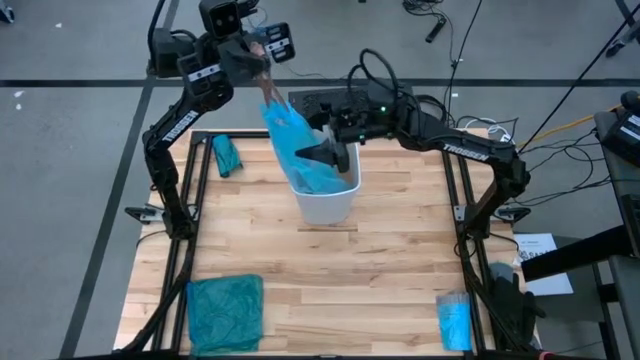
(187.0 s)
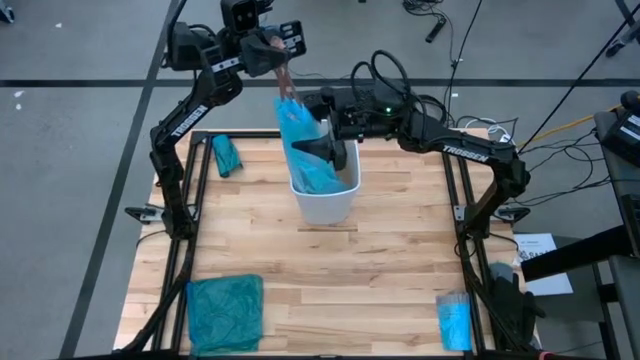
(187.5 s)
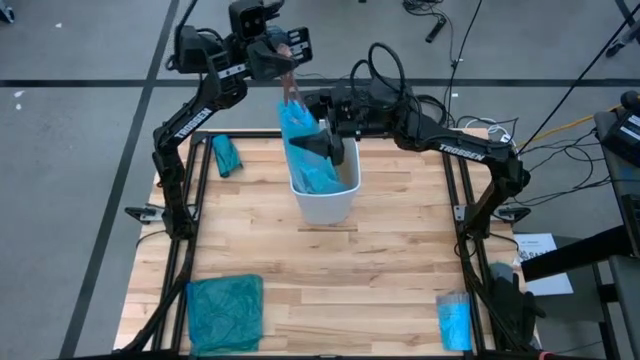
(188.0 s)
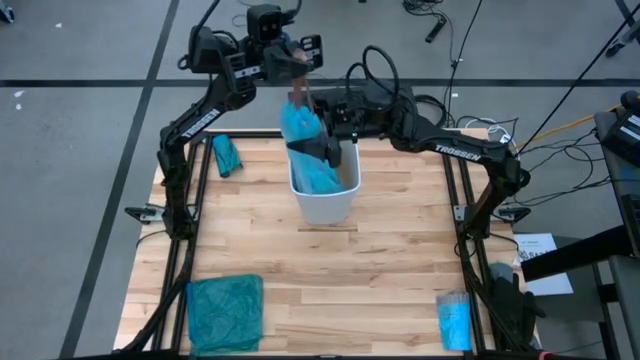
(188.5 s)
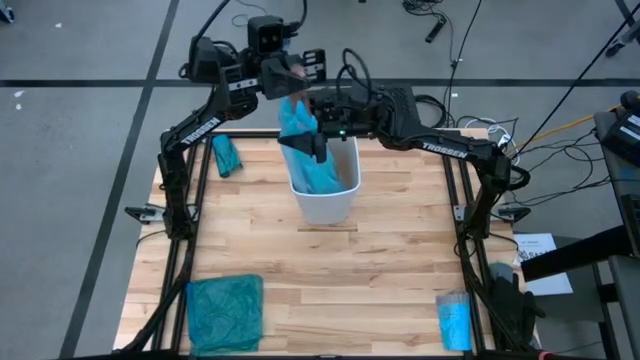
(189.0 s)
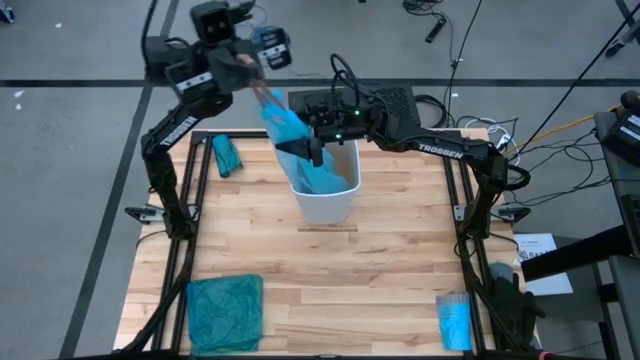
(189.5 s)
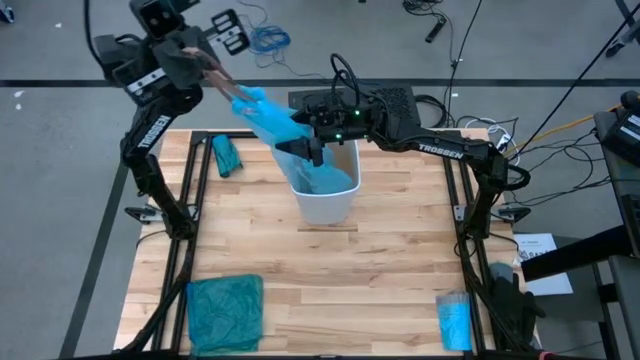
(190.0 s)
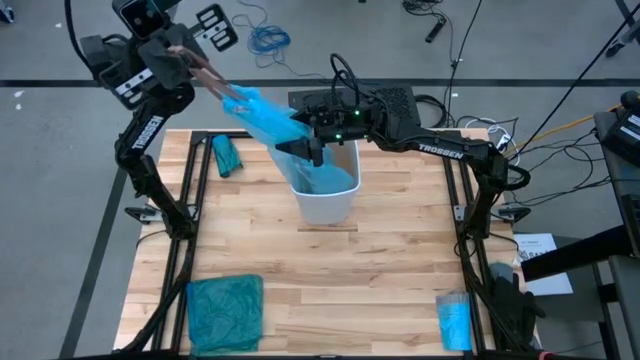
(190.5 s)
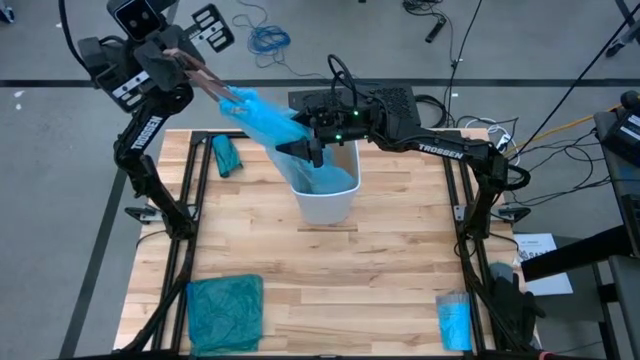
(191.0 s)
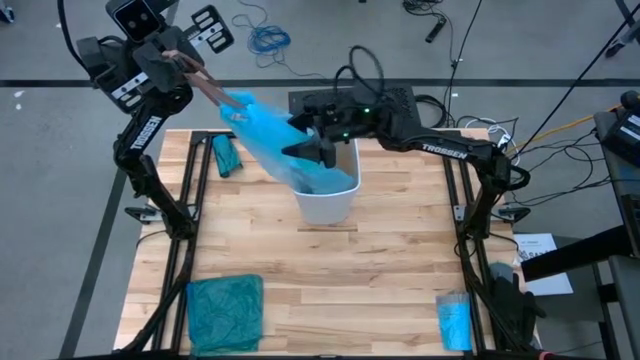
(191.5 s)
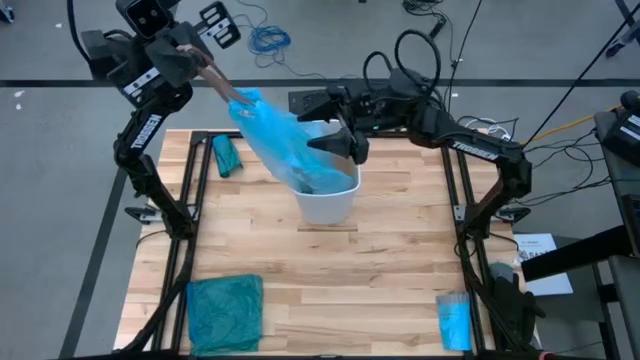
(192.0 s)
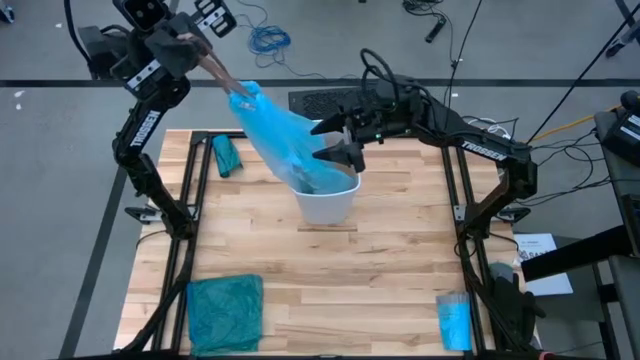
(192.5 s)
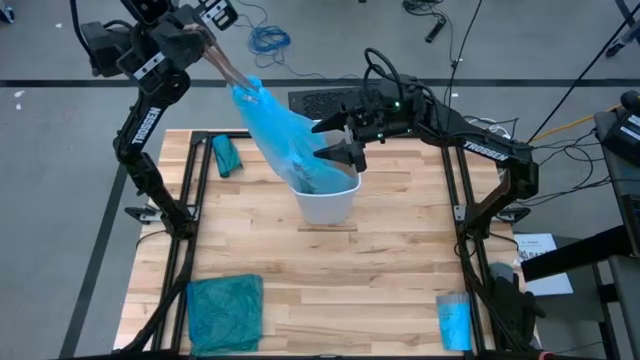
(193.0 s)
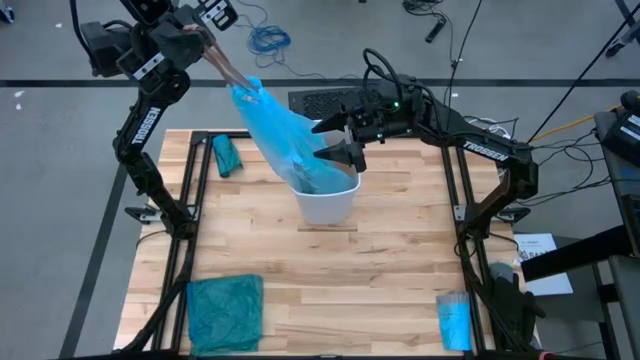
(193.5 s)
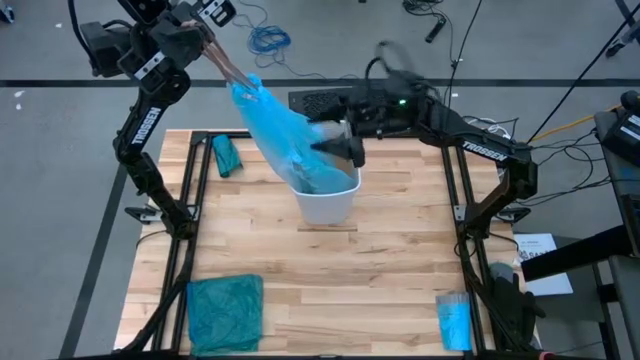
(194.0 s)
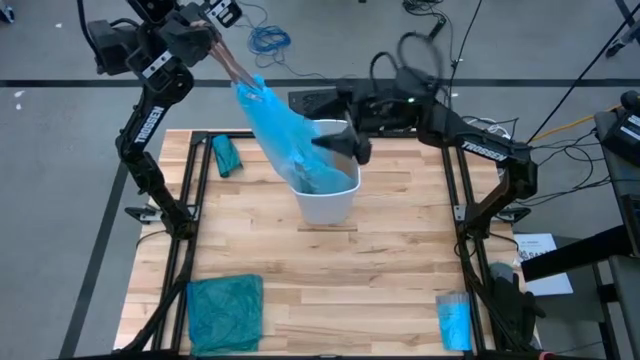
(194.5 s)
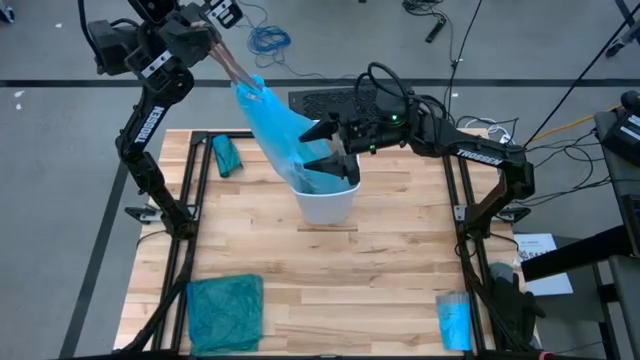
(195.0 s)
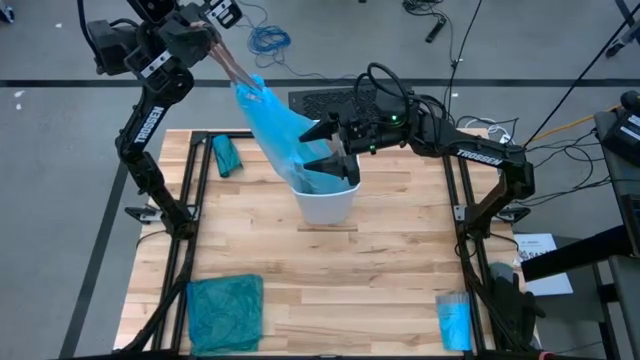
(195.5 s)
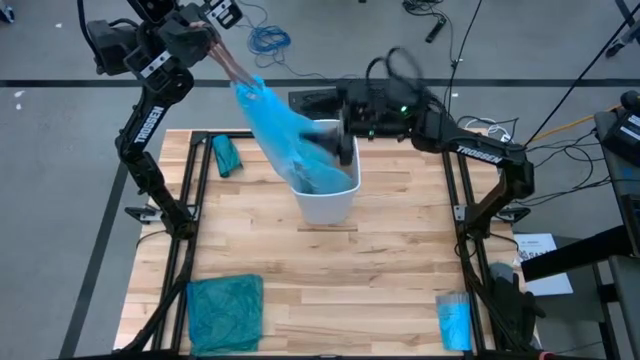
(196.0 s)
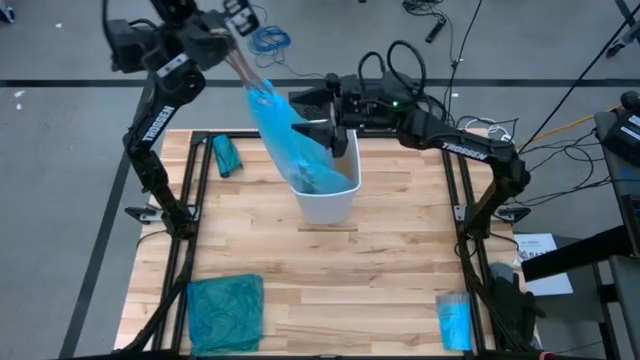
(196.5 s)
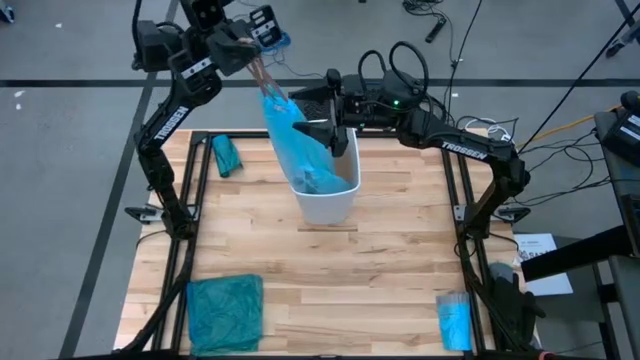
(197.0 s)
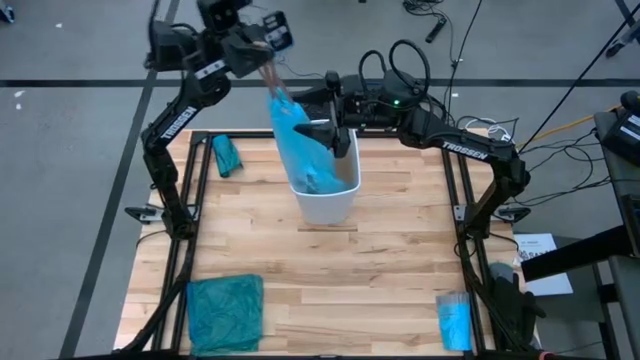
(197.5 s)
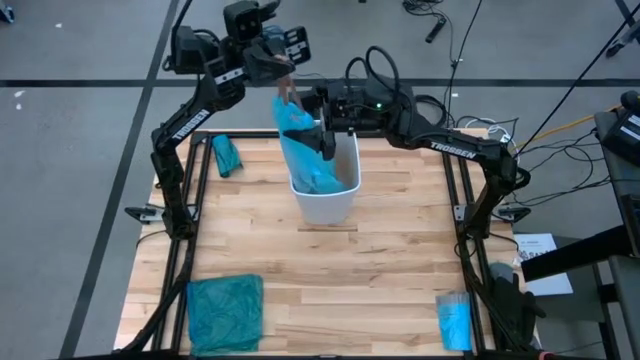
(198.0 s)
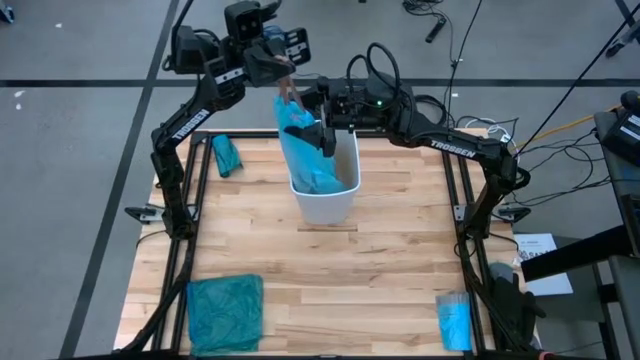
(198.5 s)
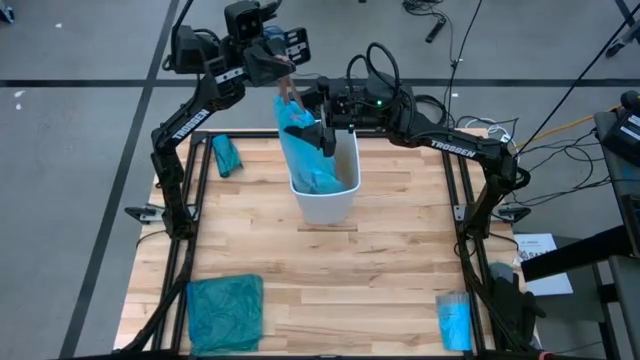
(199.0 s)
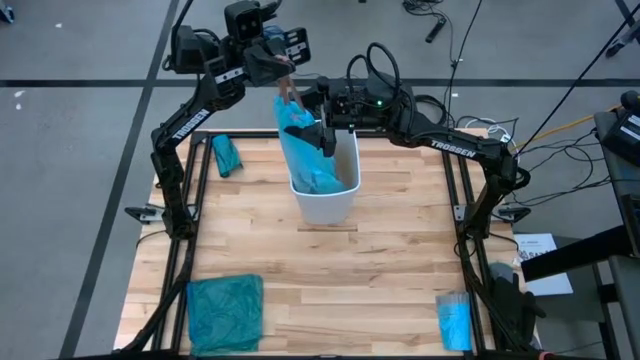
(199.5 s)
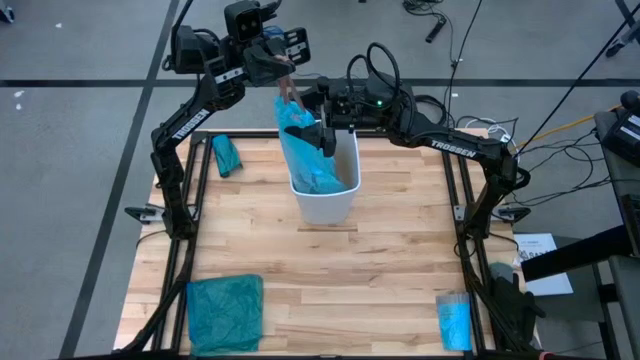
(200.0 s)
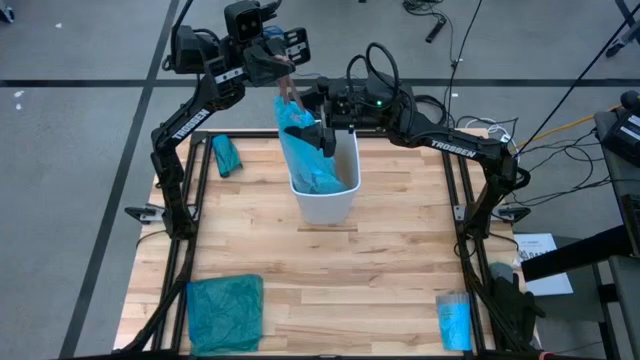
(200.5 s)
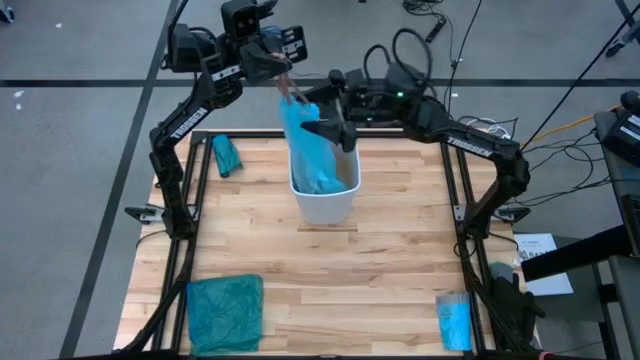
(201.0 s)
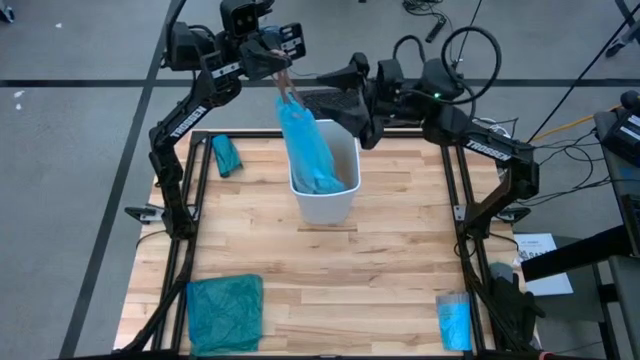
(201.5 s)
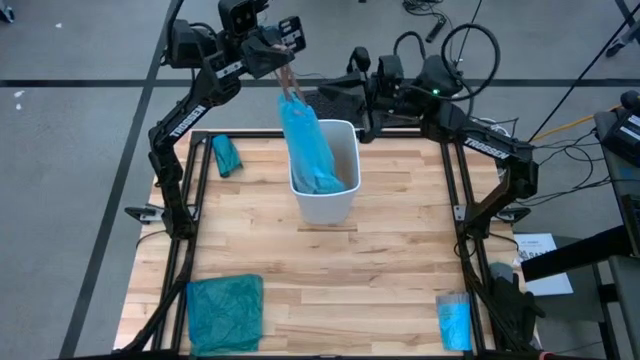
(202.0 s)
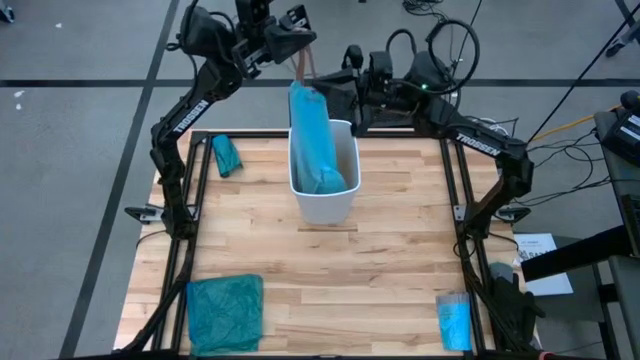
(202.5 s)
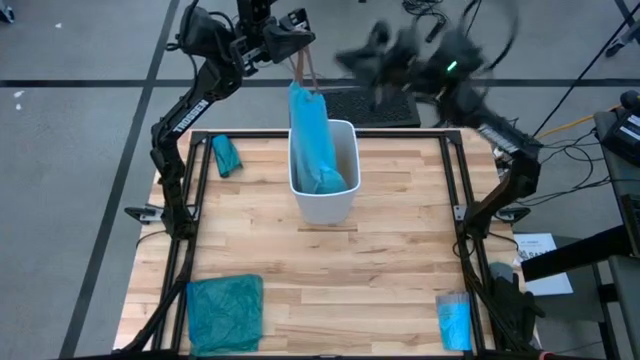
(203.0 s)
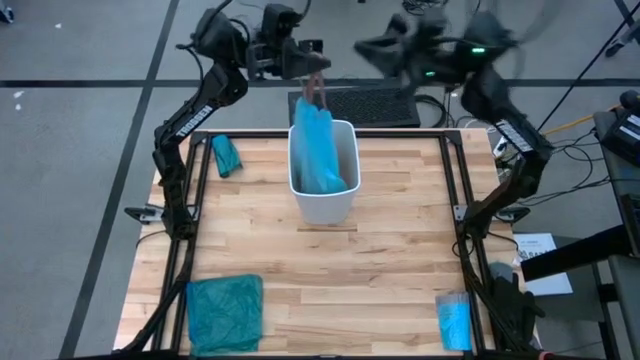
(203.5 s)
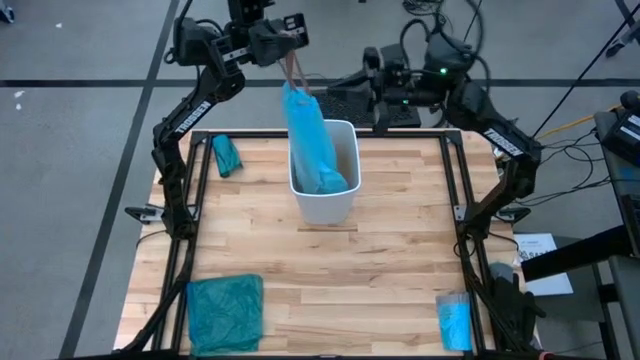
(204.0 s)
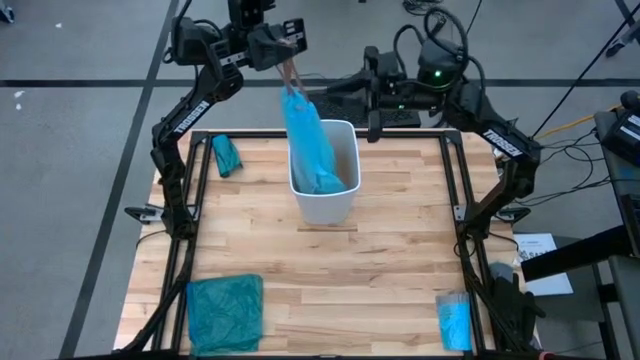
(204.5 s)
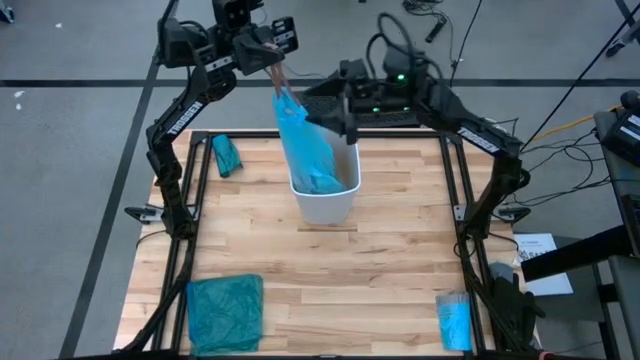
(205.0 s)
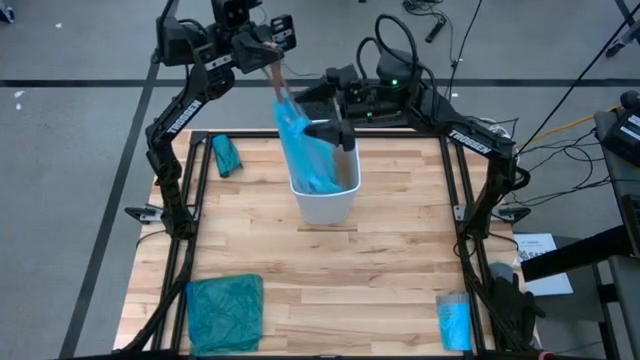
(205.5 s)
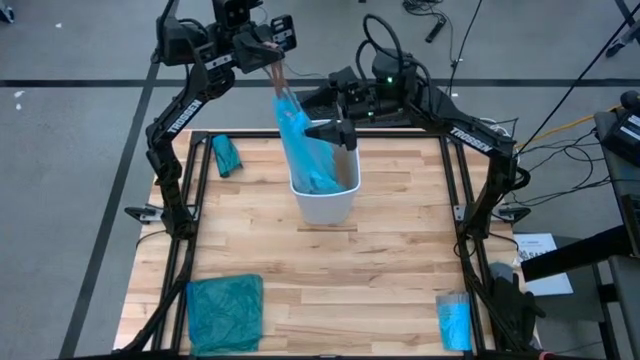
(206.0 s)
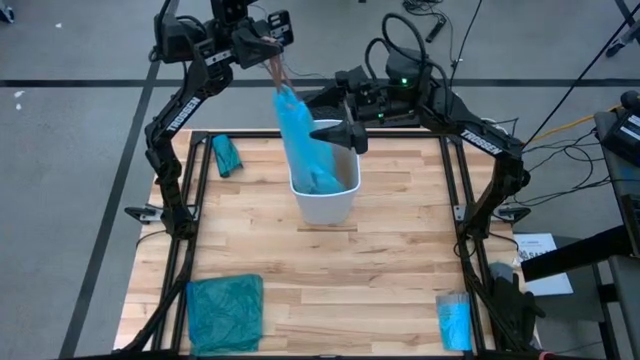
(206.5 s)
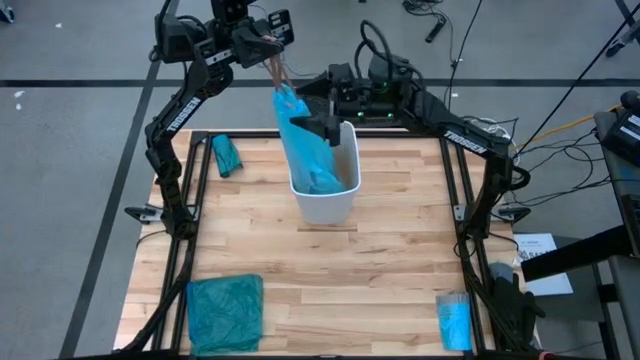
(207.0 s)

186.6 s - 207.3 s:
Task: place trash/remove bag and relplace
Remove the blue trash bag from the white trash bin
